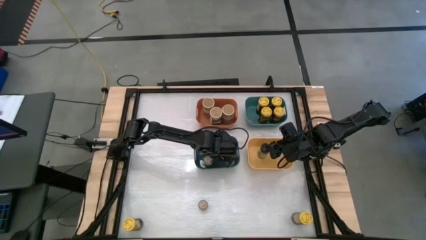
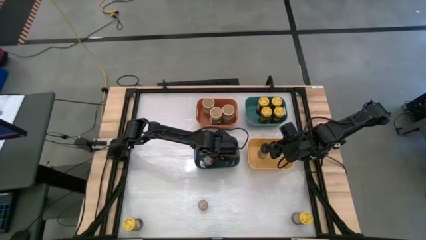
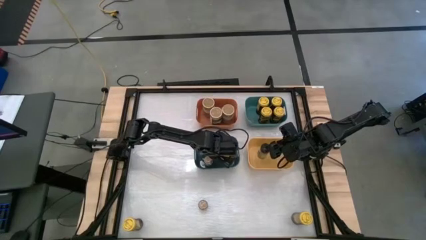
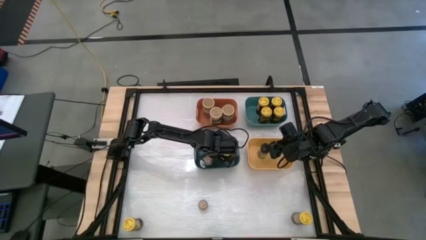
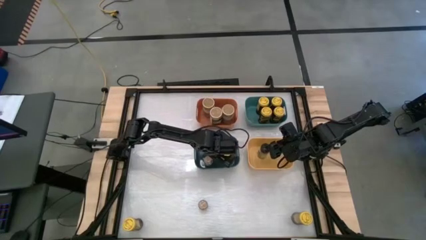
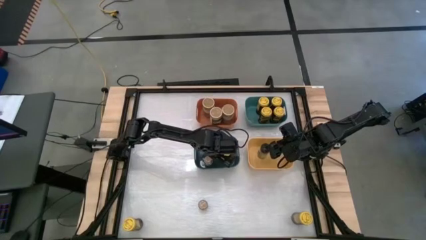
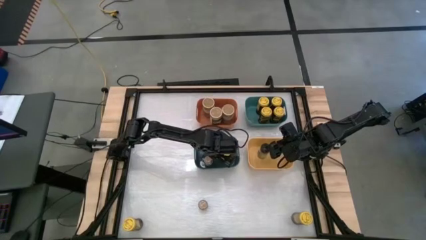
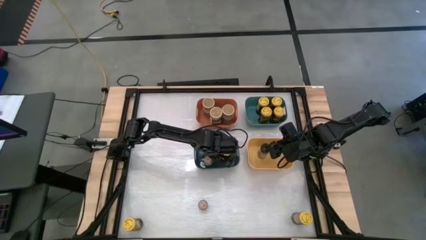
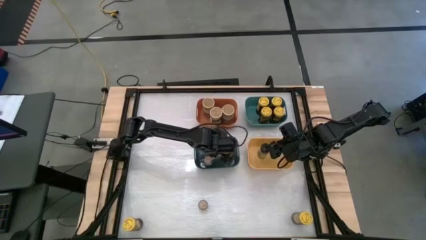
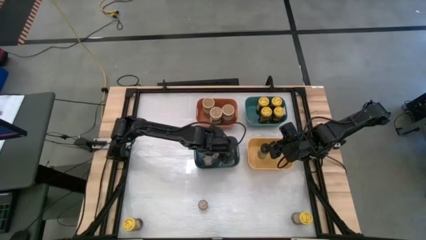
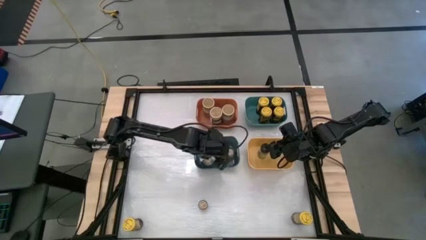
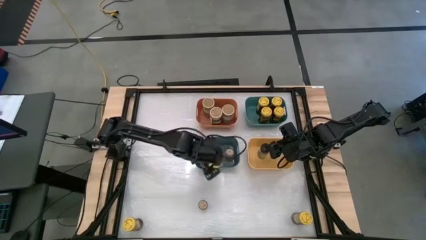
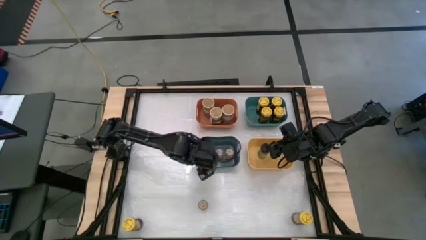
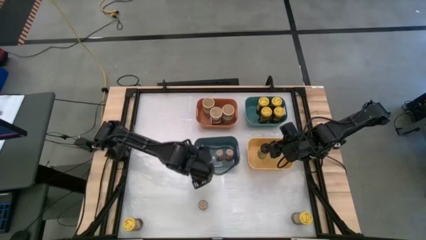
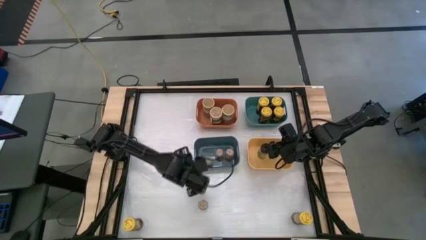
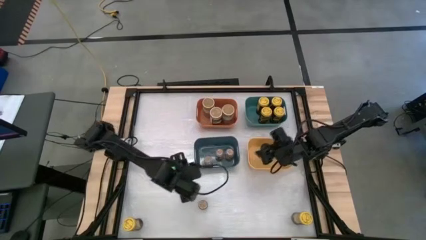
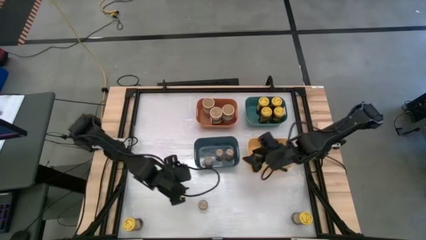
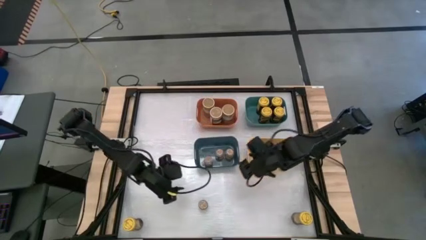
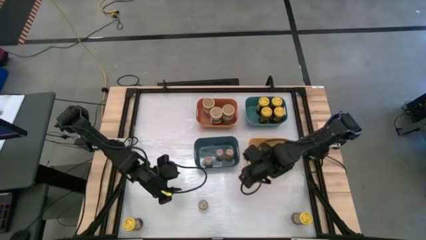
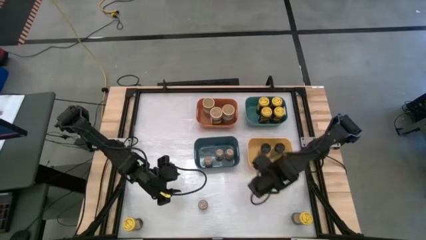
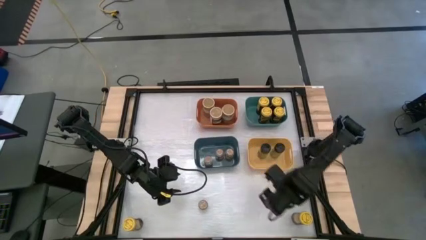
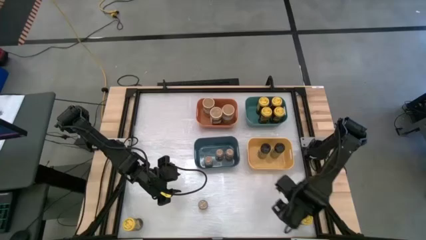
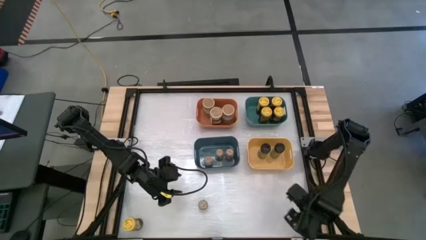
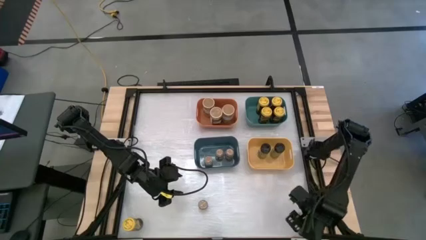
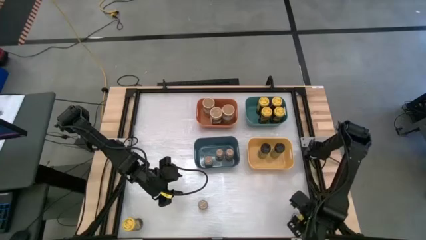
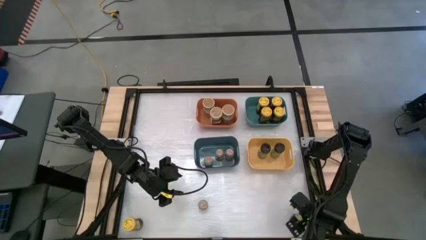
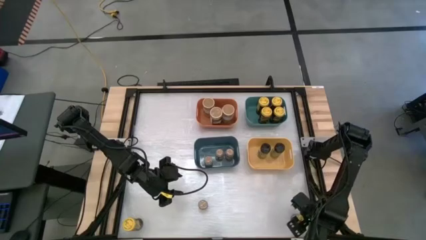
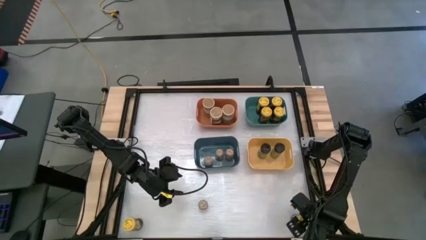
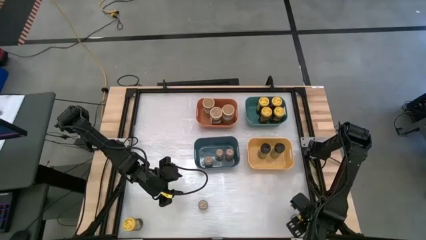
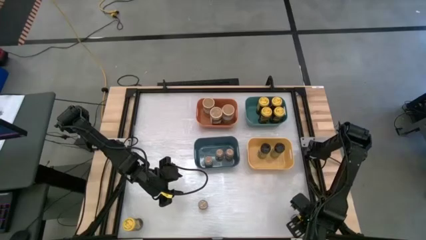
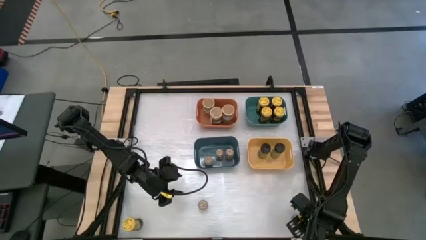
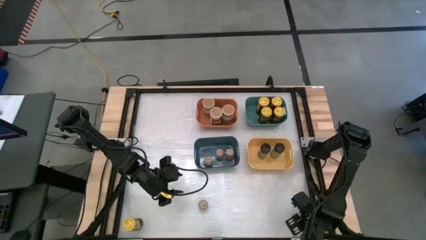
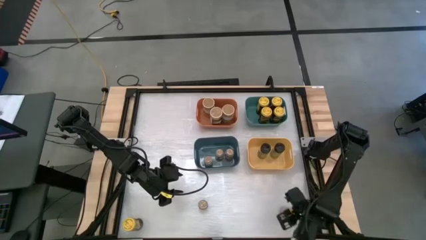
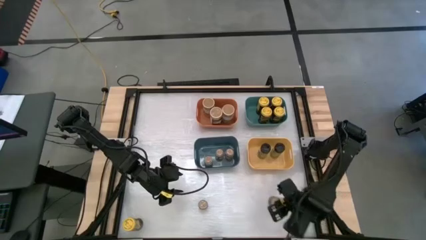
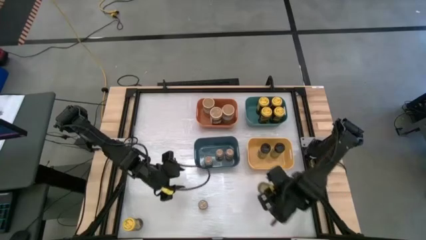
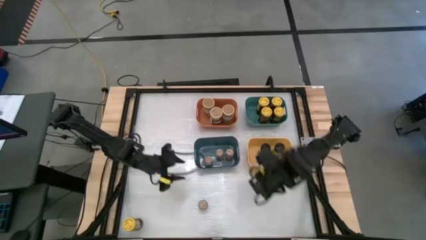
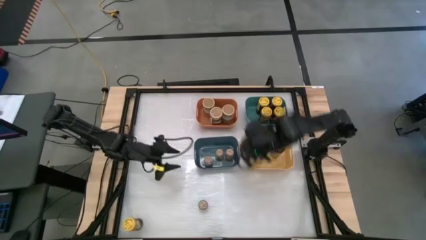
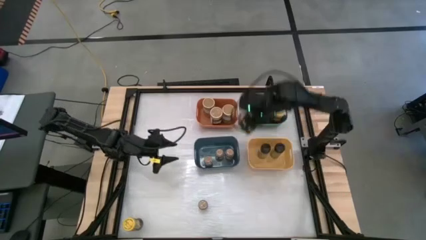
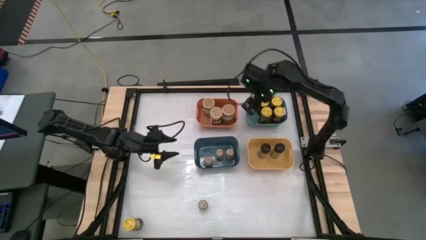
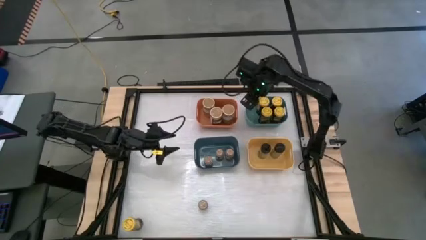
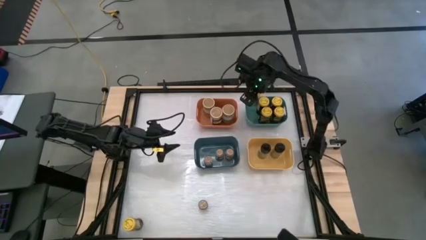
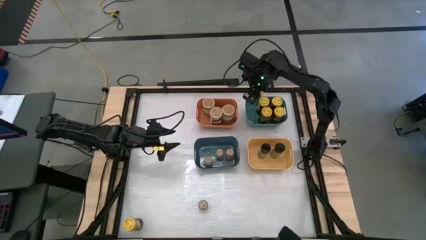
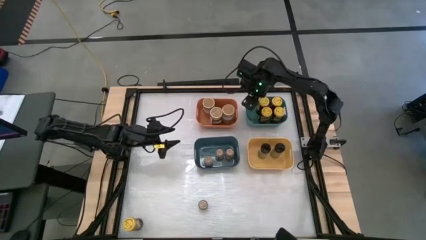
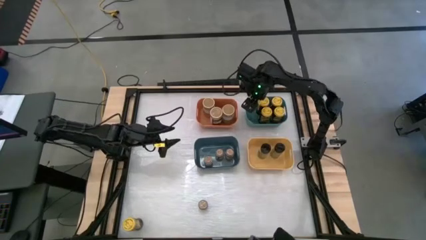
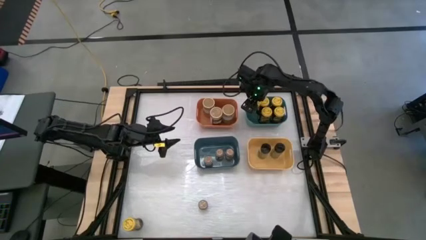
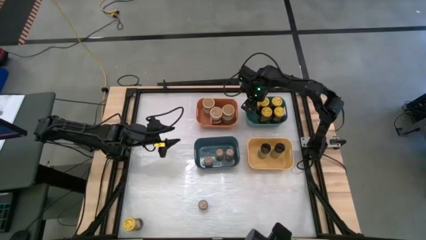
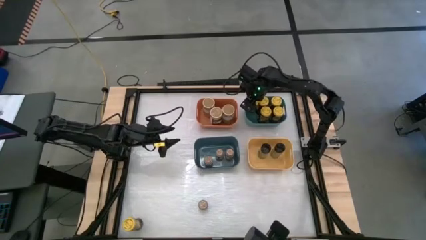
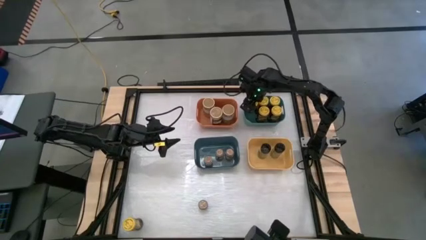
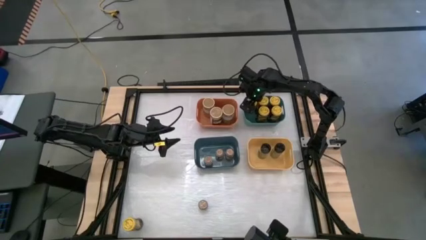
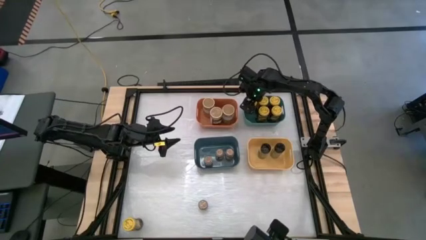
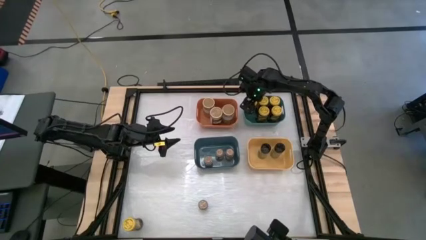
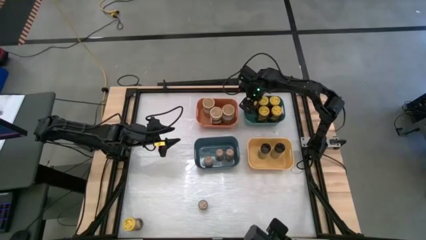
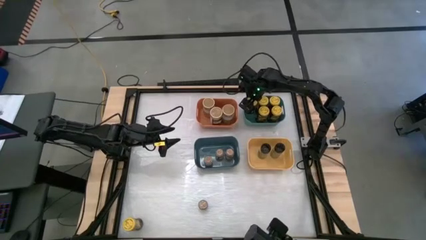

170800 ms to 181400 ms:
Task: Sort spices by type
Put the yellow spice bottle into the green bin

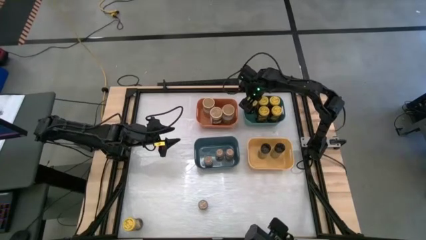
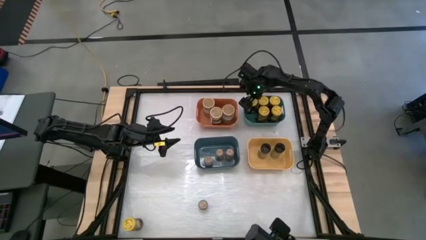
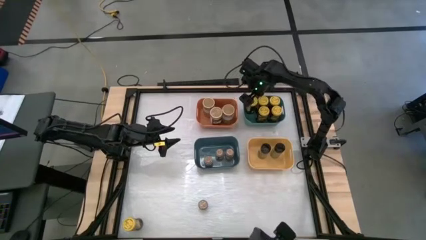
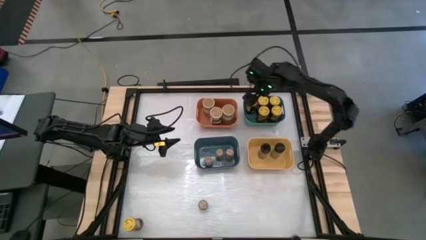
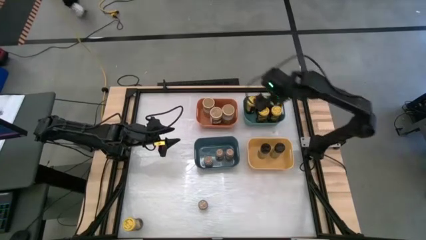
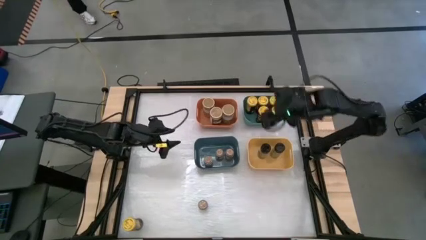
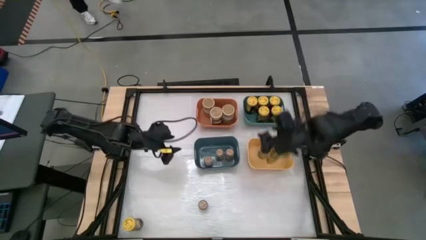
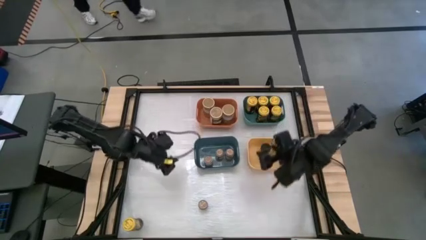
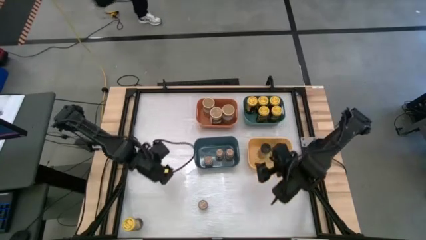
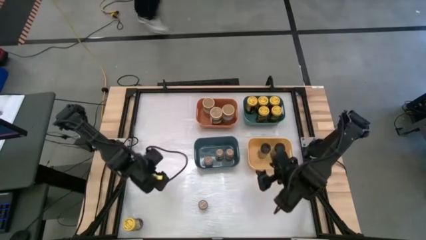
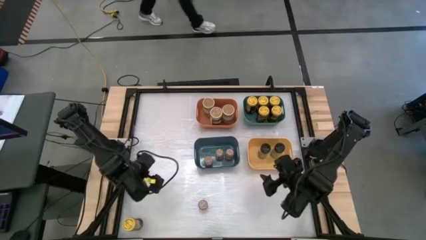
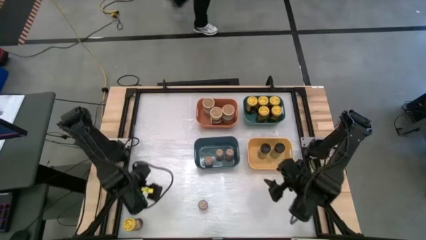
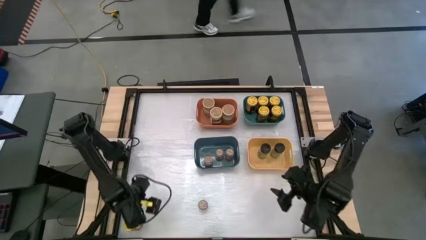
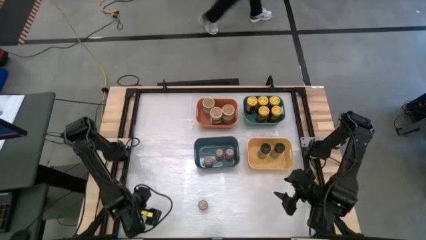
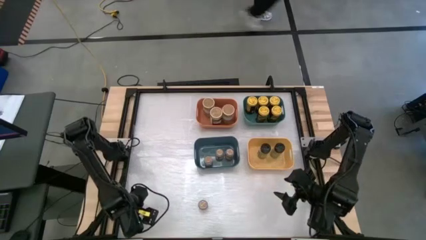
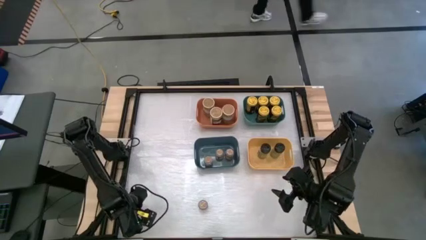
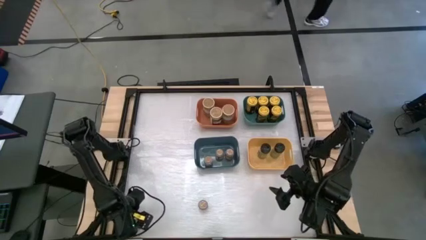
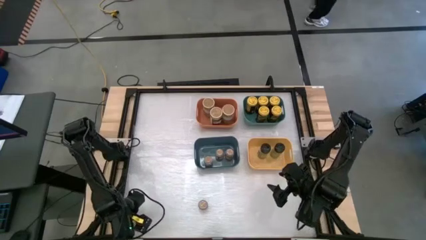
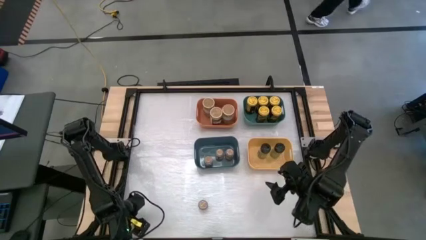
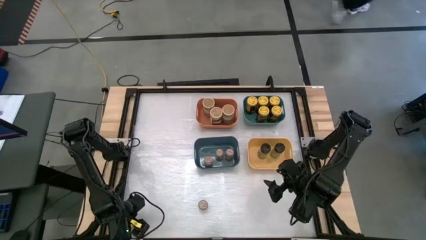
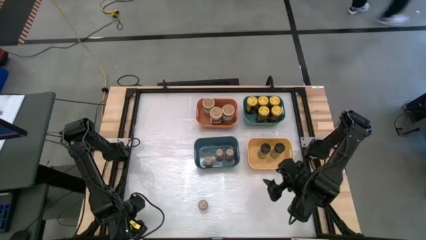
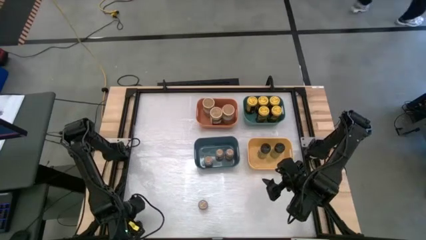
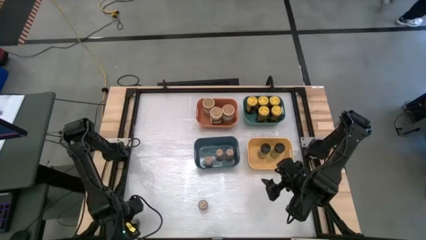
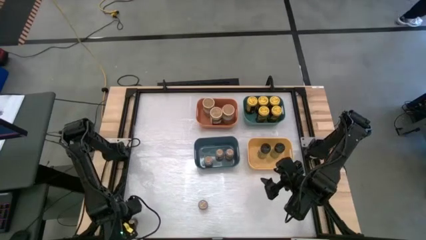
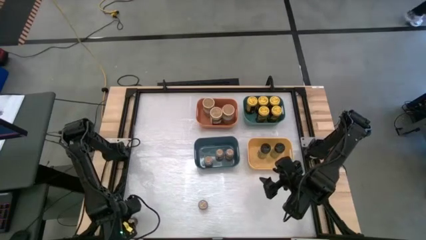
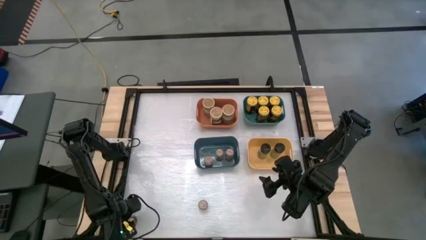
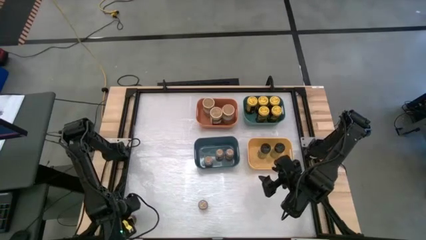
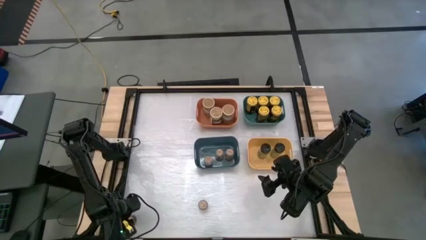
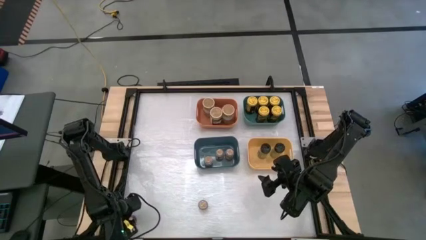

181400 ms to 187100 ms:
Put the yellow spice bottle into the green bin
